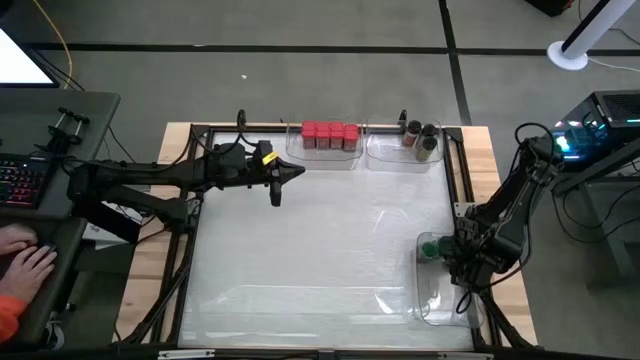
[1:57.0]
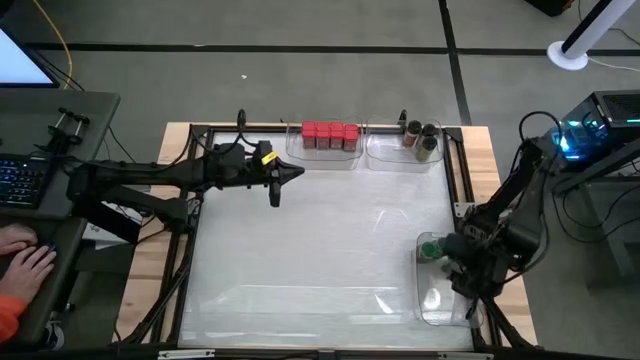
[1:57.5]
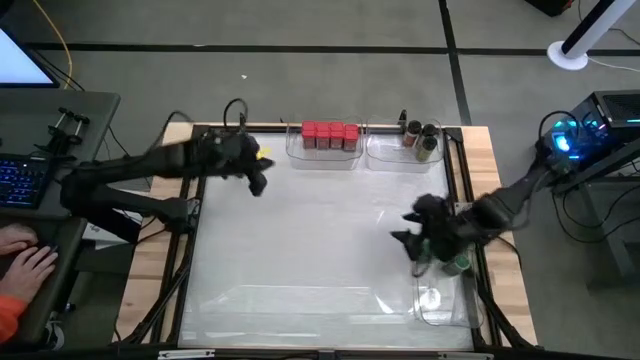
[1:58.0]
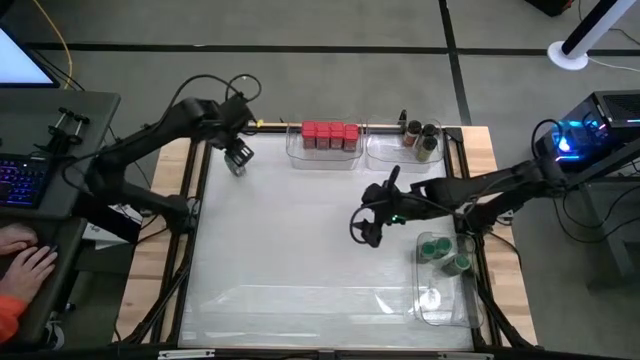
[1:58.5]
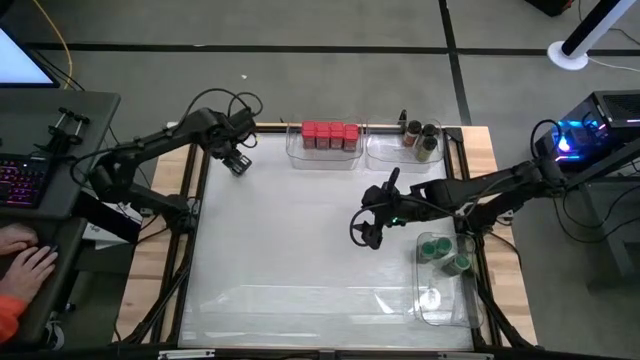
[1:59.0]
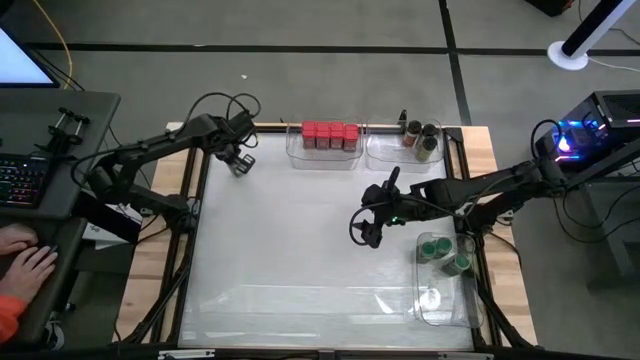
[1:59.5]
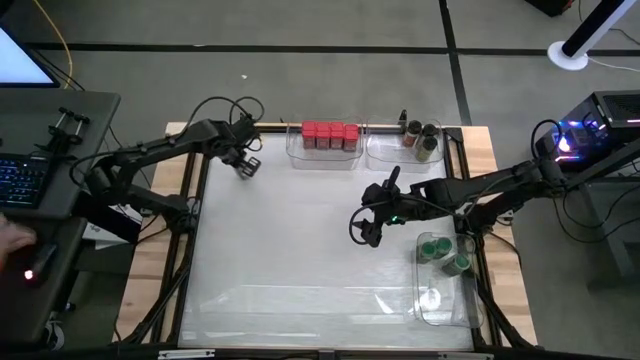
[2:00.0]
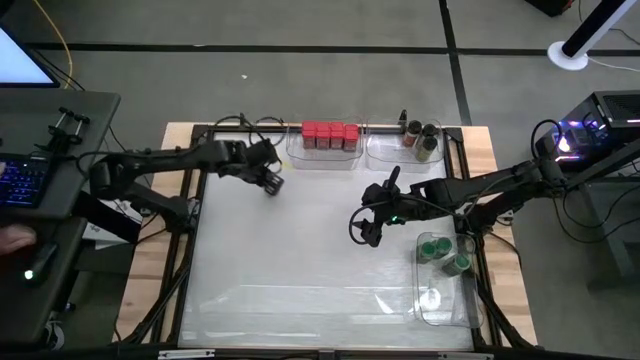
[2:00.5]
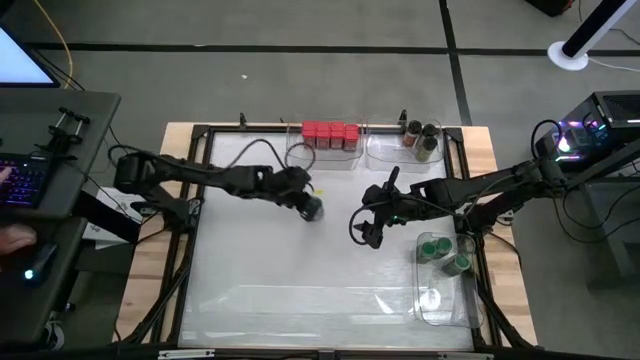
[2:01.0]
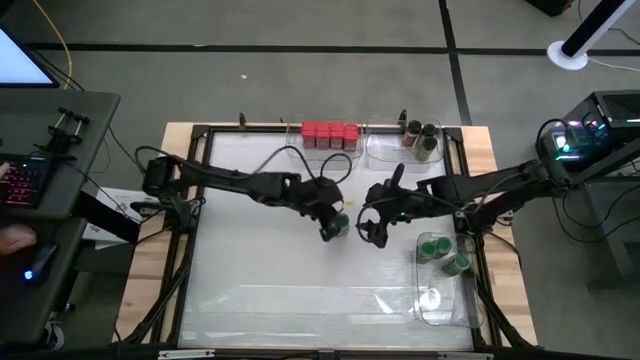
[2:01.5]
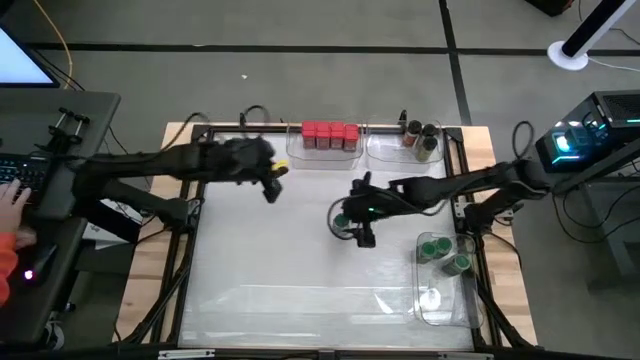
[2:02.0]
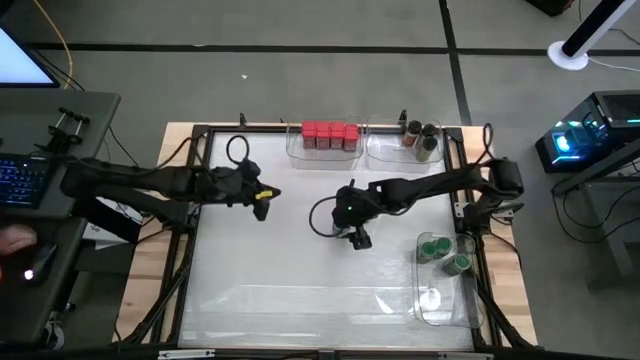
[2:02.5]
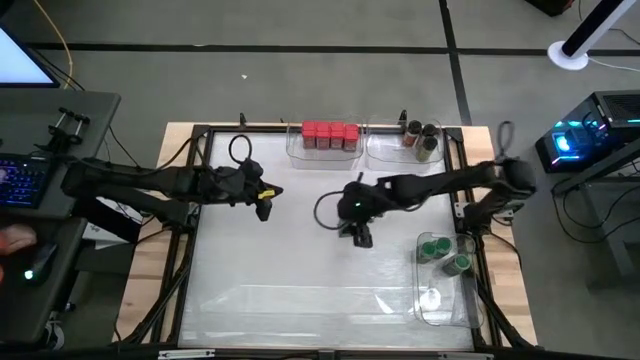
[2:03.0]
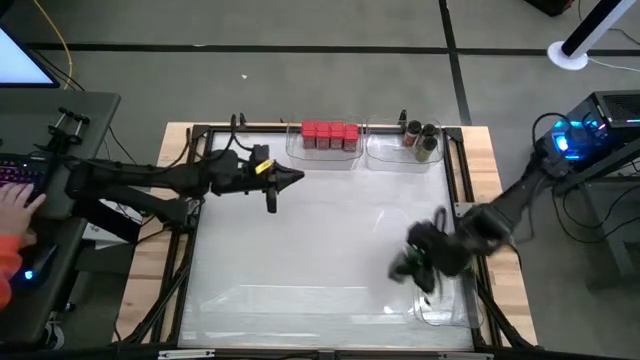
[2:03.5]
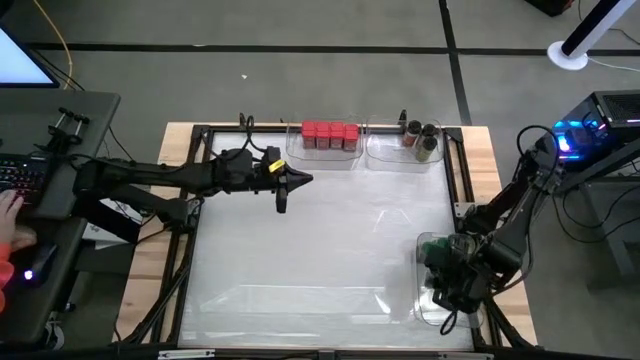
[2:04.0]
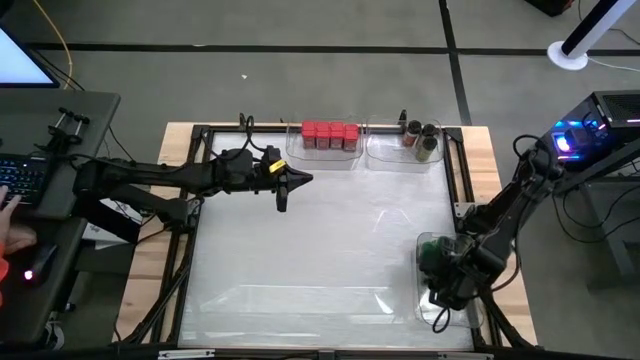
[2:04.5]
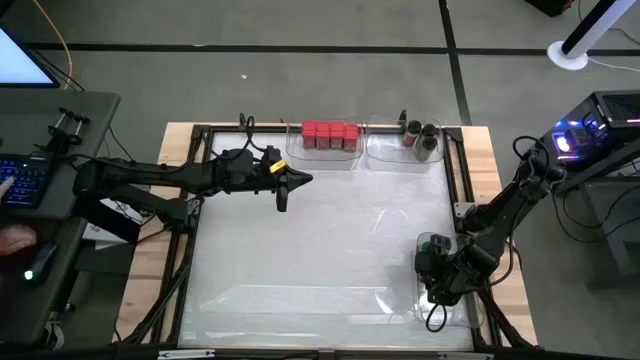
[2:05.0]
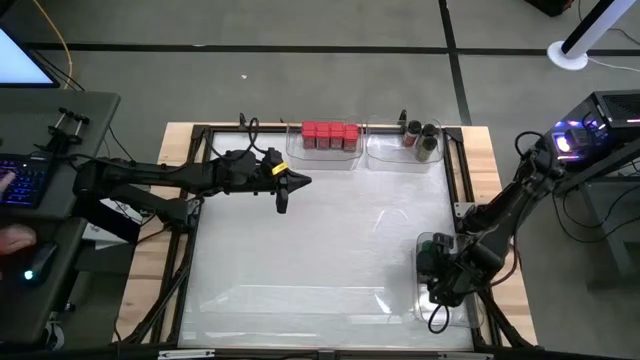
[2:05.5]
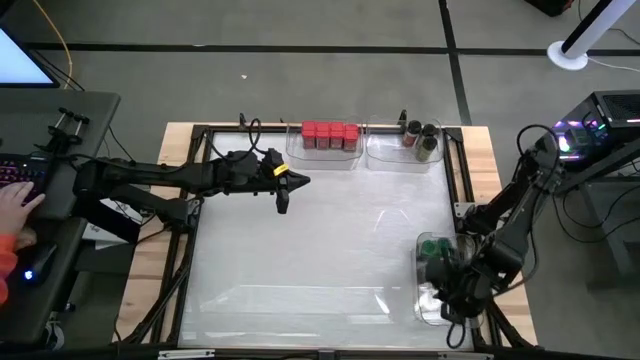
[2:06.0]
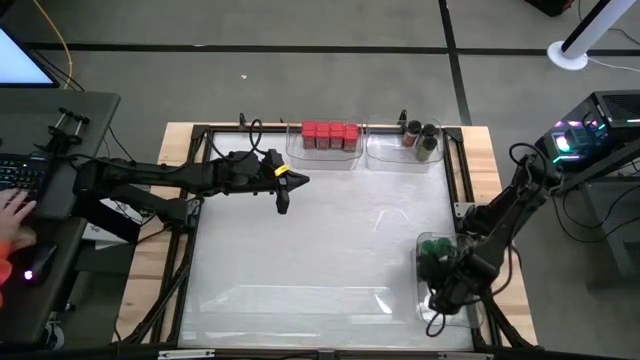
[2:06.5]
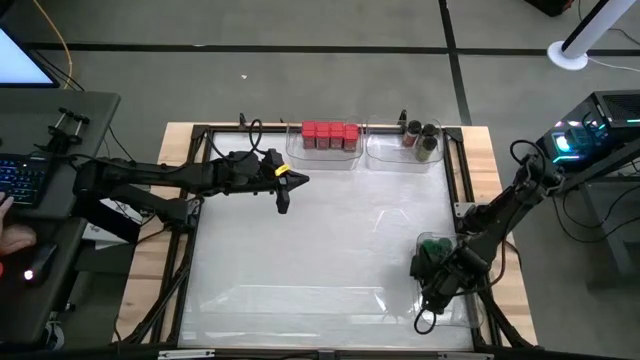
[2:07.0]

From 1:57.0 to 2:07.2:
Task: Sort spices by type
Put the green seasoning bottle into the bottom transparent bin

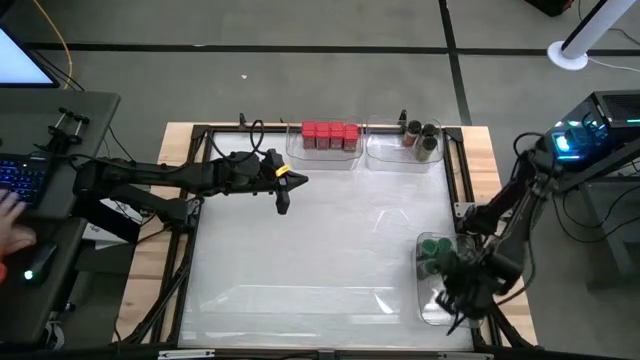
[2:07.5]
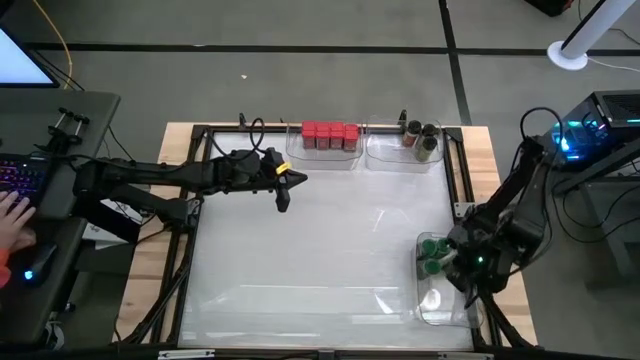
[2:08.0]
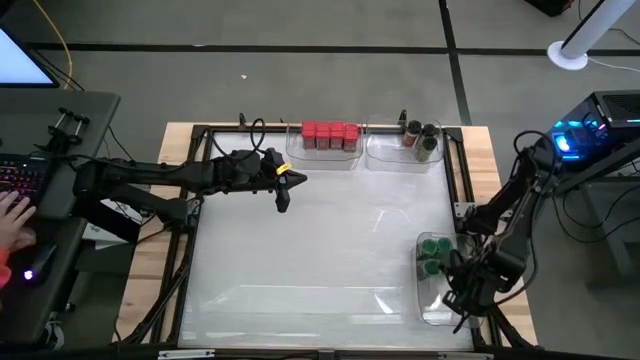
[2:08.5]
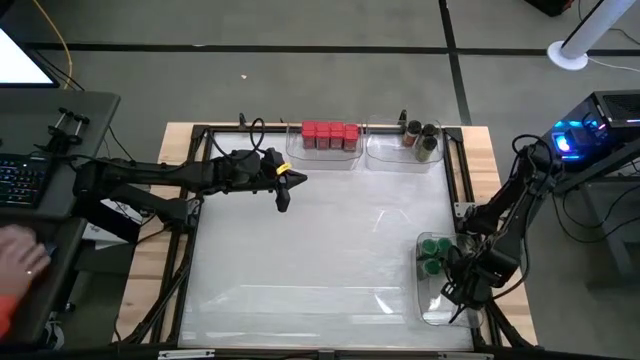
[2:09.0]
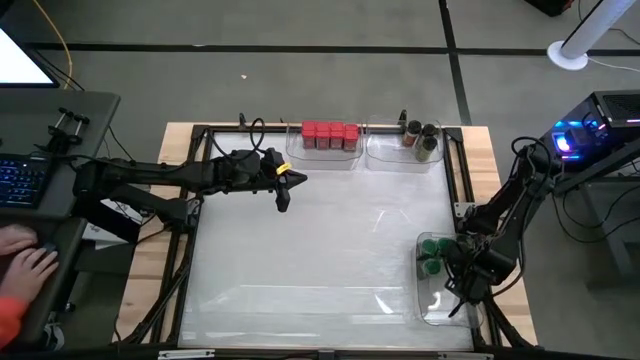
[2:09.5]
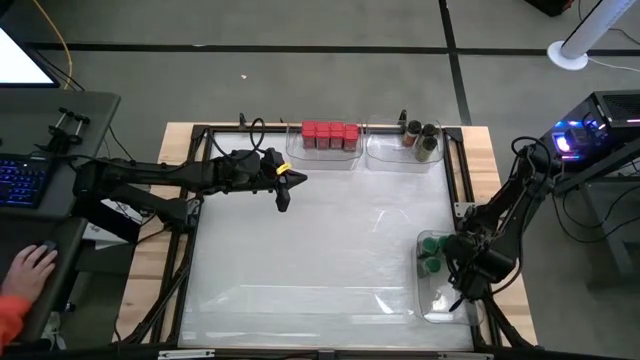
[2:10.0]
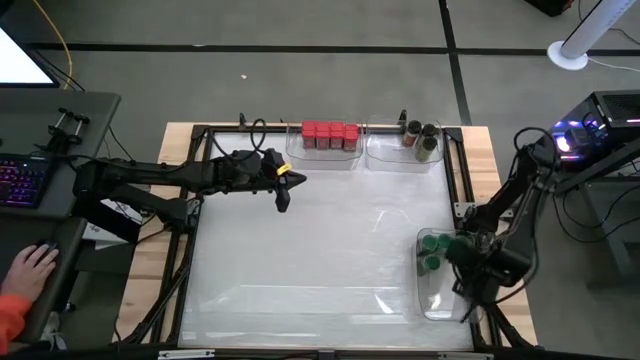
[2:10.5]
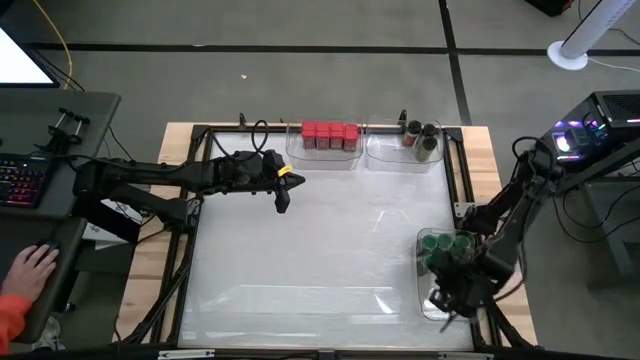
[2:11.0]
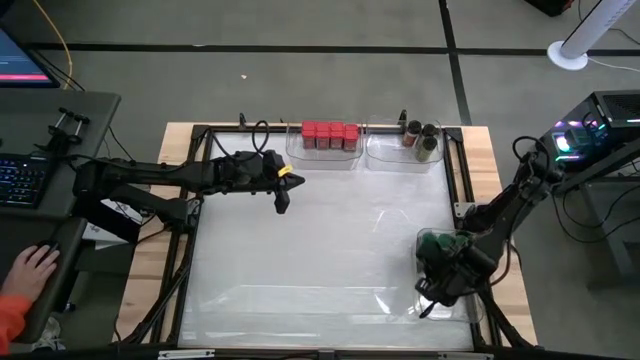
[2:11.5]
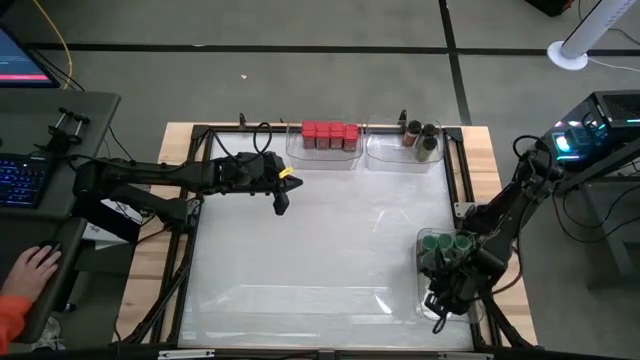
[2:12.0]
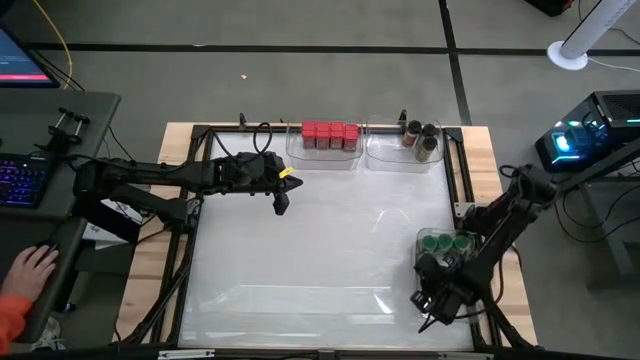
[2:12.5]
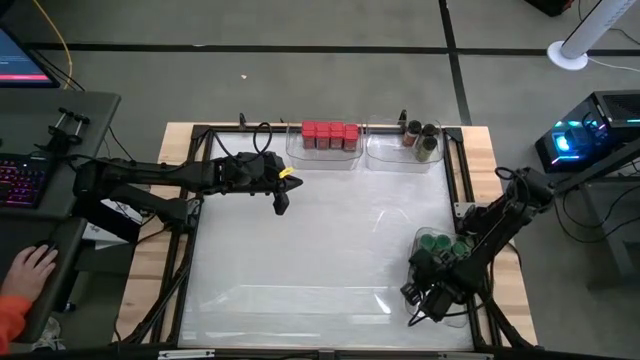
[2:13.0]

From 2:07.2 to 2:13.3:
Adjust the green seasoning bottles inside the bottom transparent bin

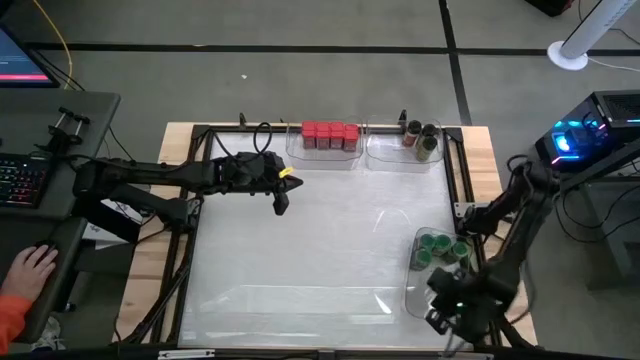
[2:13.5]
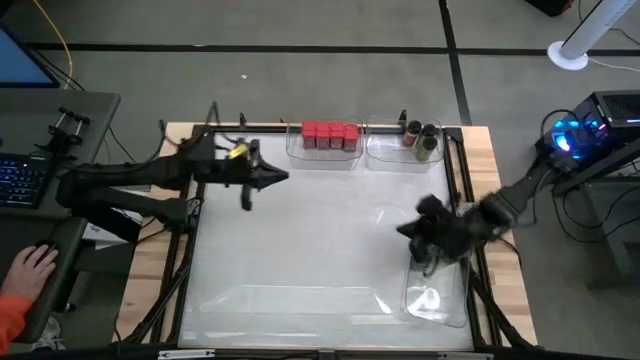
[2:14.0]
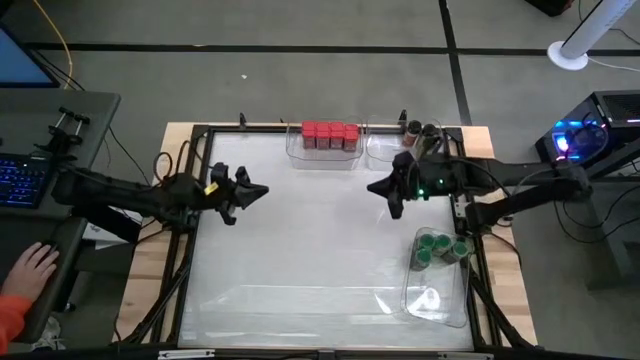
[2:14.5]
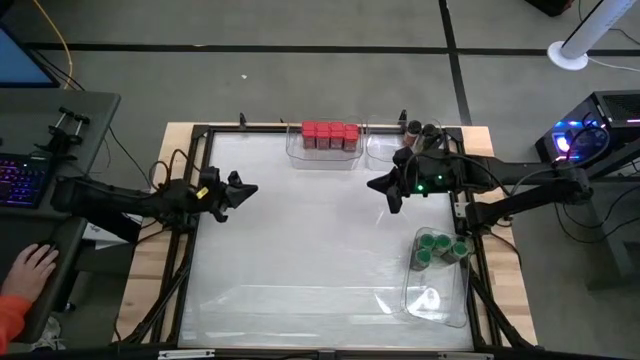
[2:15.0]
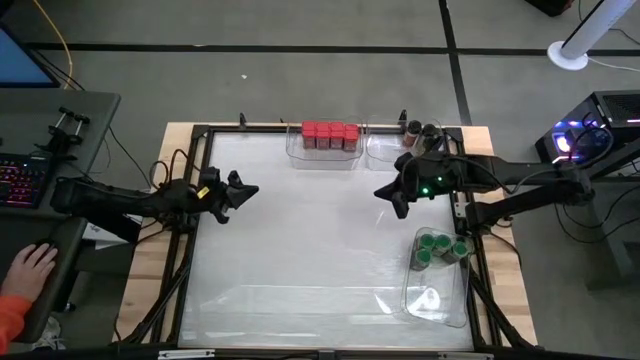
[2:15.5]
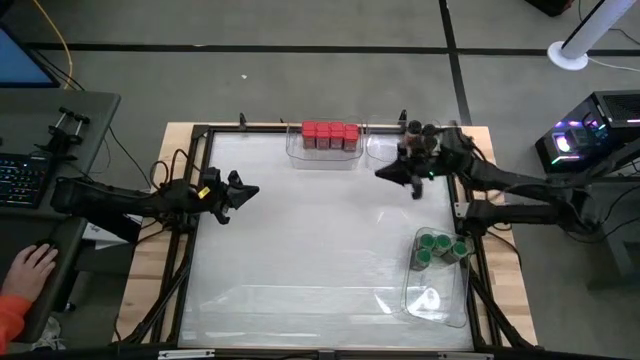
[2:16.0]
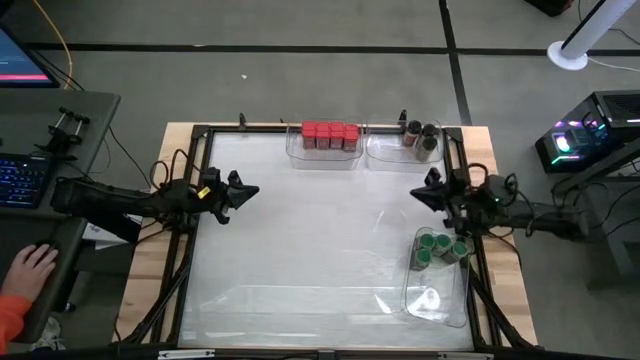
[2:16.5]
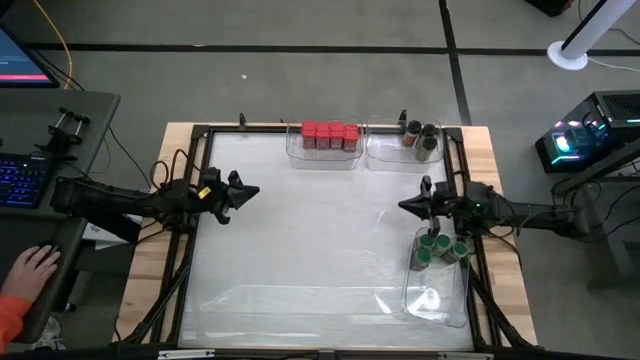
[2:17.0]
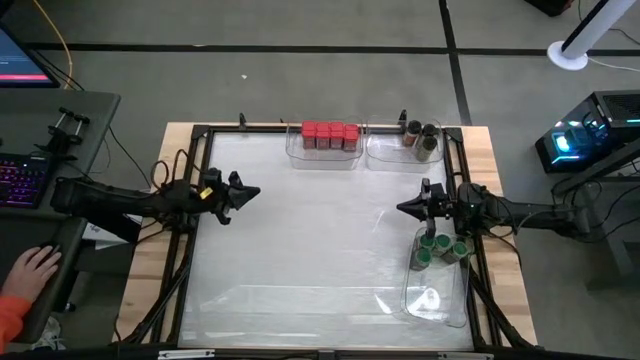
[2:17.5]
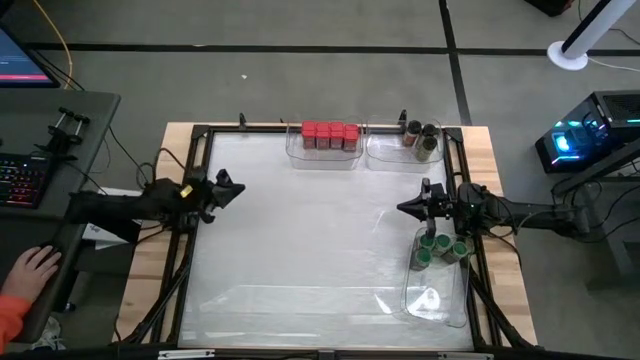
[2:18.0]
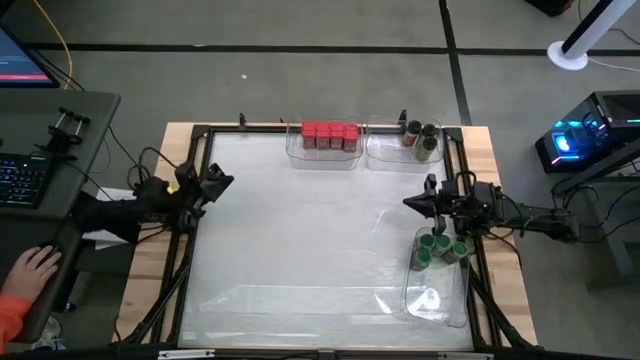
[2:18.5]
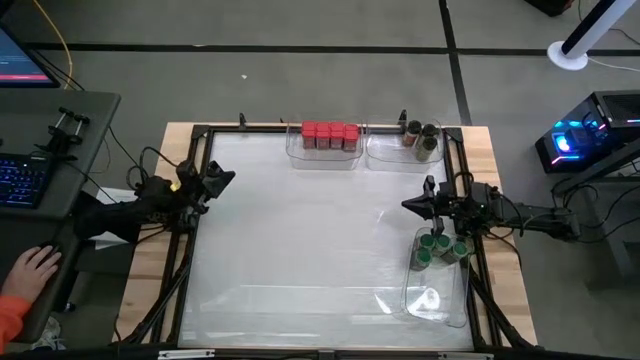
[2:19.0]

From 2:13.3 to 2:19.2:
Return to Home Position
